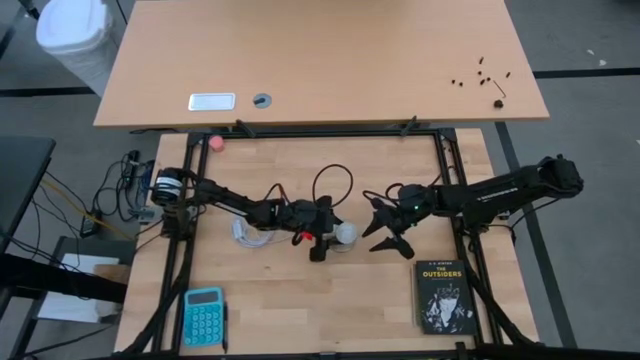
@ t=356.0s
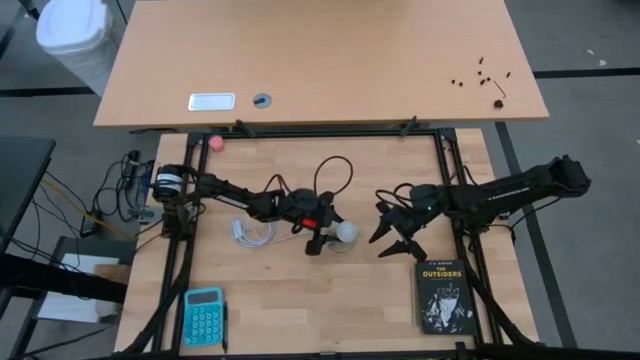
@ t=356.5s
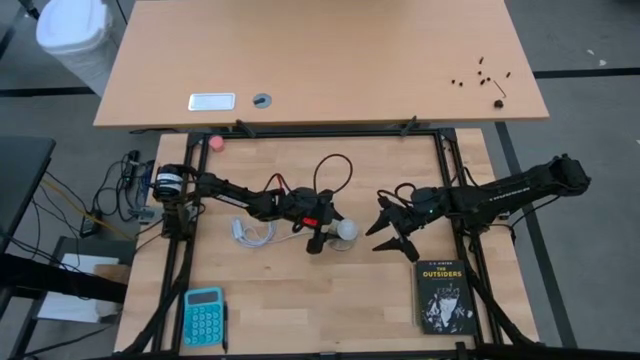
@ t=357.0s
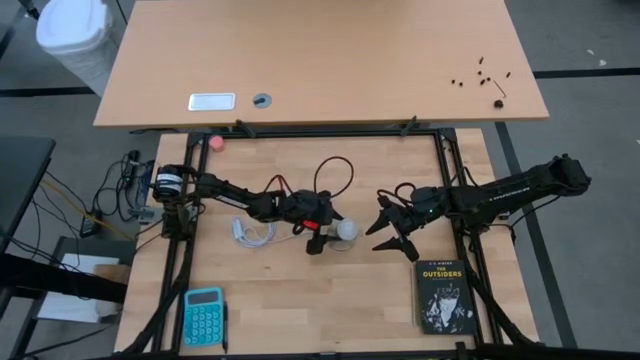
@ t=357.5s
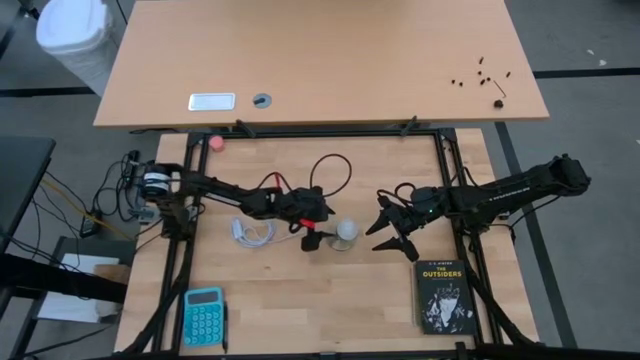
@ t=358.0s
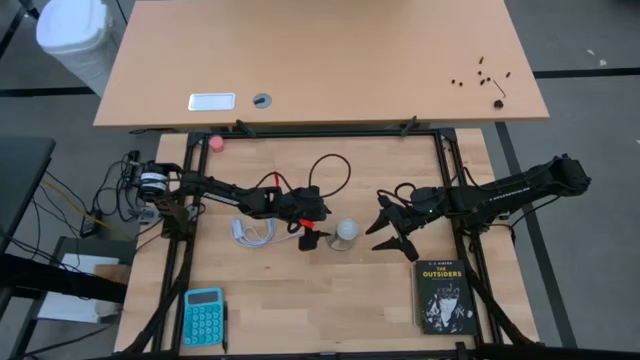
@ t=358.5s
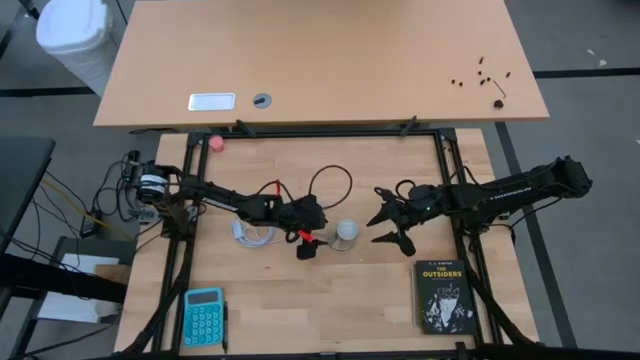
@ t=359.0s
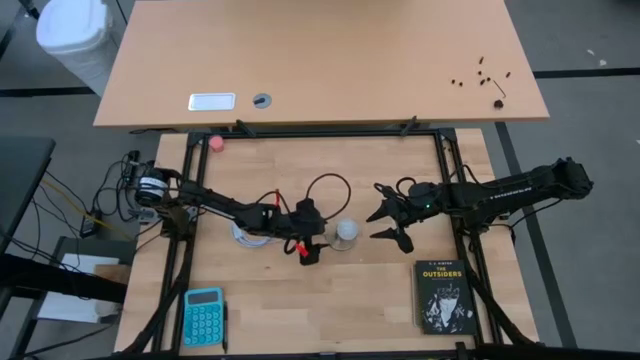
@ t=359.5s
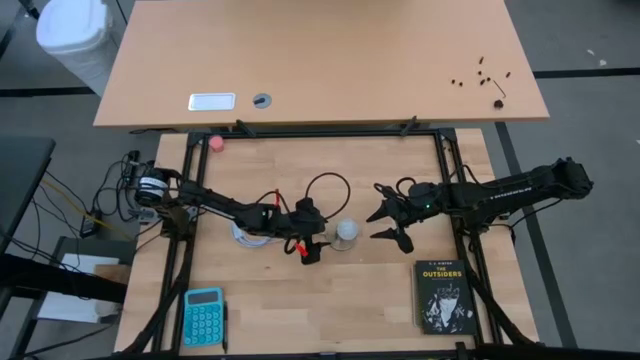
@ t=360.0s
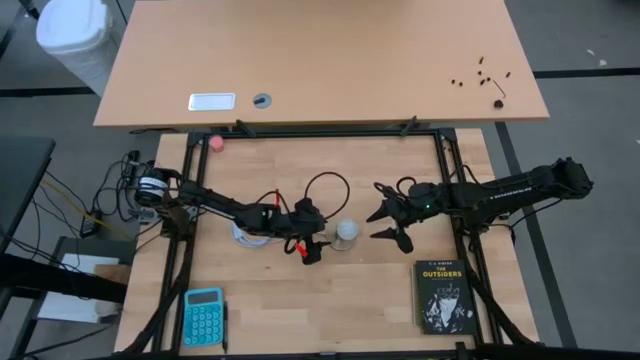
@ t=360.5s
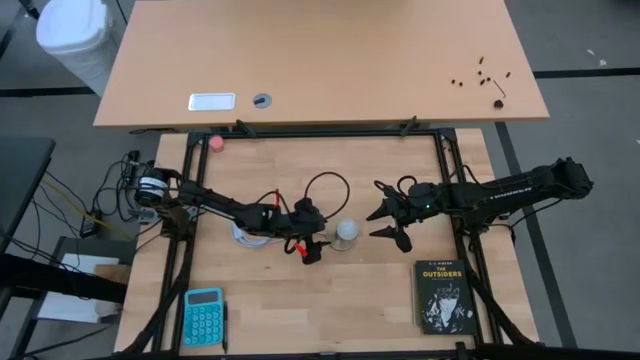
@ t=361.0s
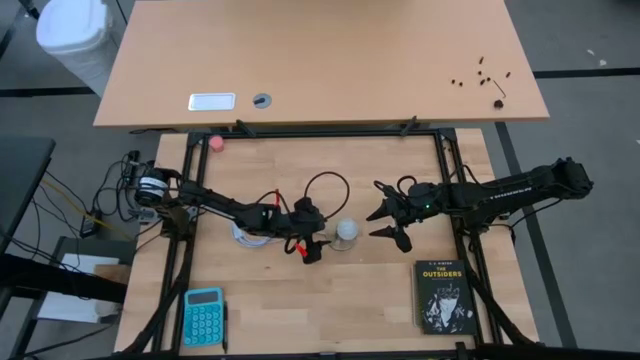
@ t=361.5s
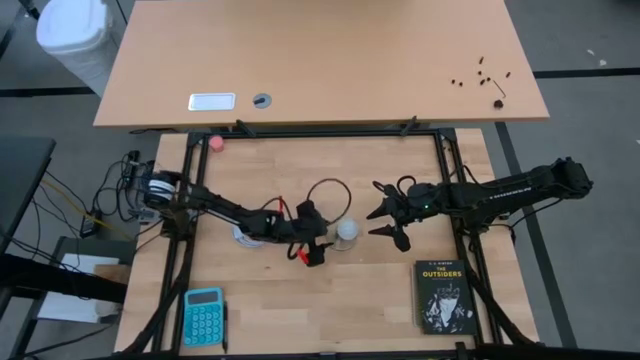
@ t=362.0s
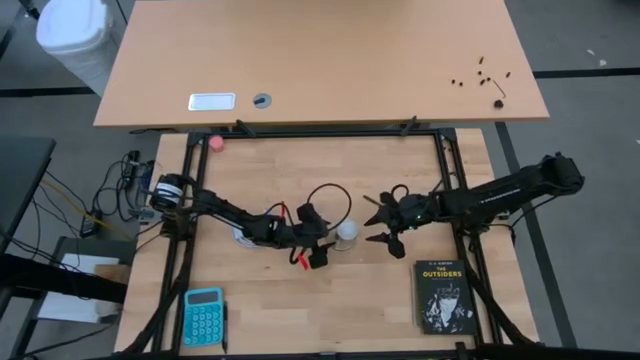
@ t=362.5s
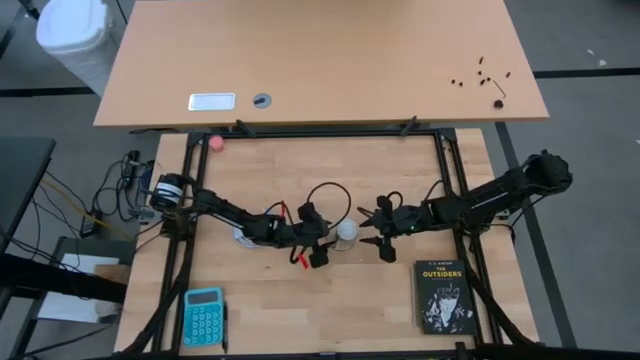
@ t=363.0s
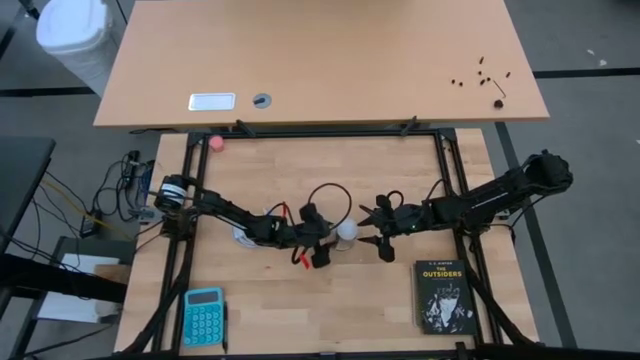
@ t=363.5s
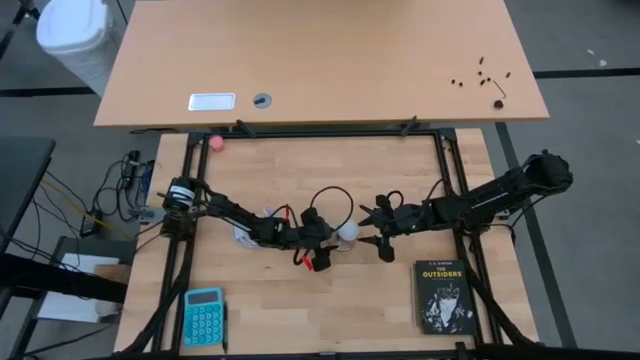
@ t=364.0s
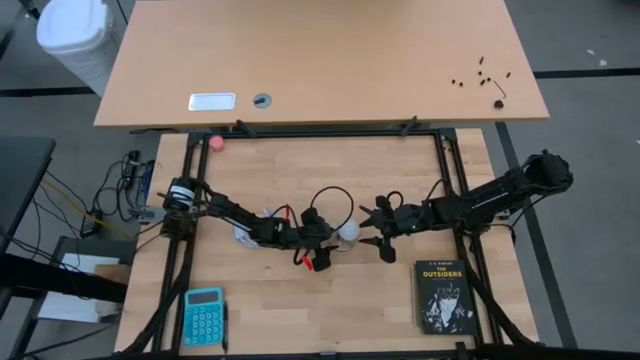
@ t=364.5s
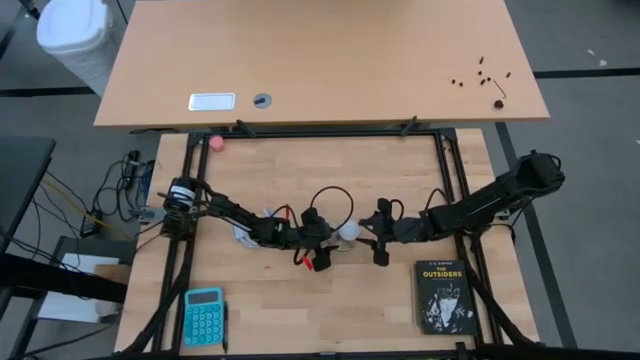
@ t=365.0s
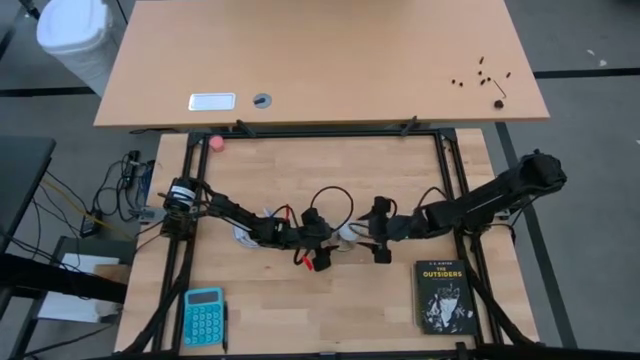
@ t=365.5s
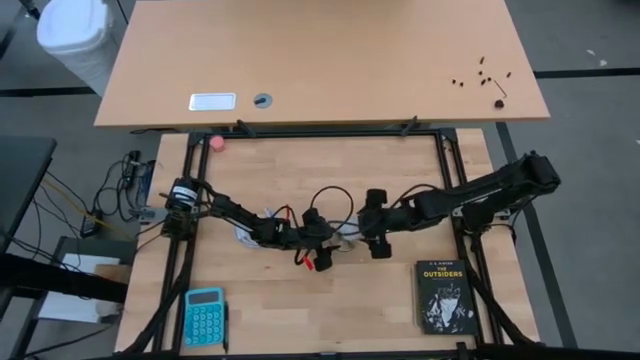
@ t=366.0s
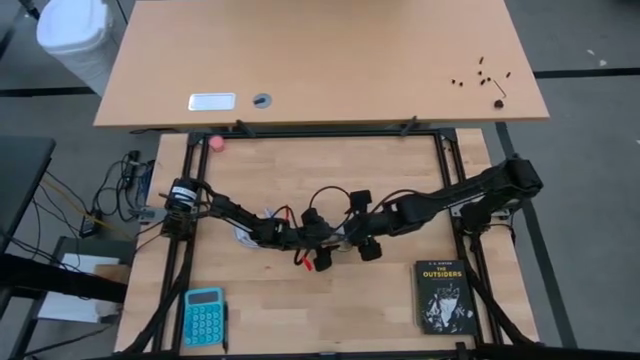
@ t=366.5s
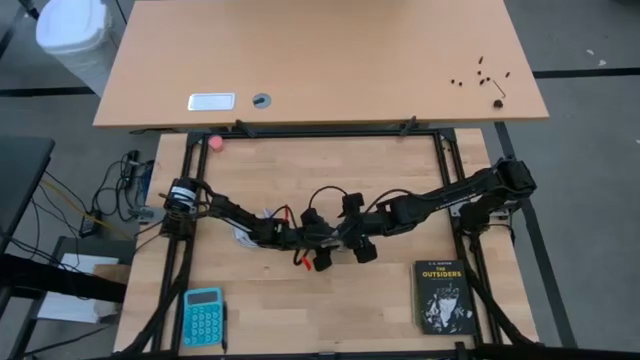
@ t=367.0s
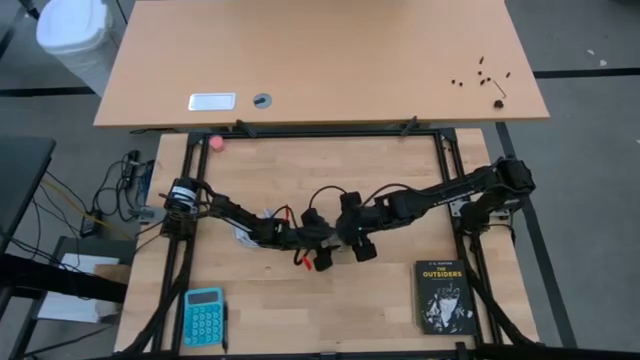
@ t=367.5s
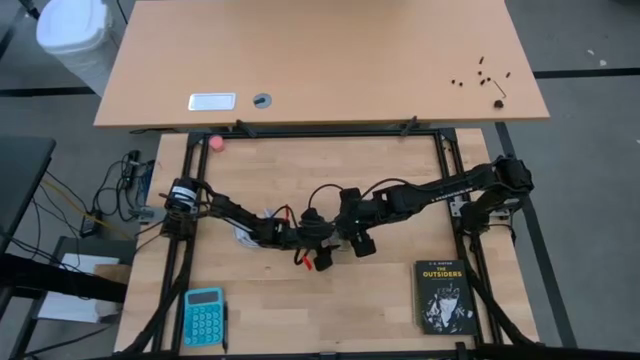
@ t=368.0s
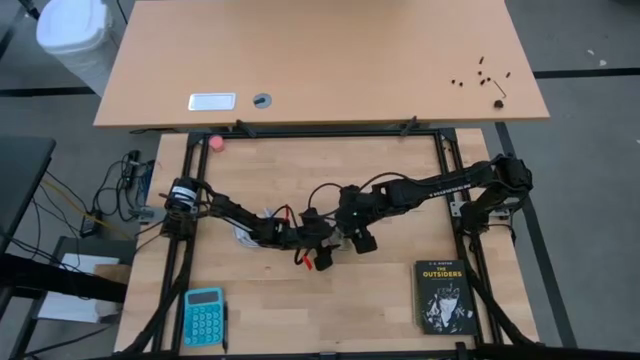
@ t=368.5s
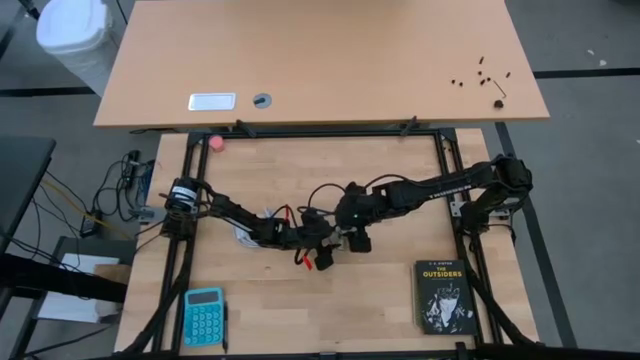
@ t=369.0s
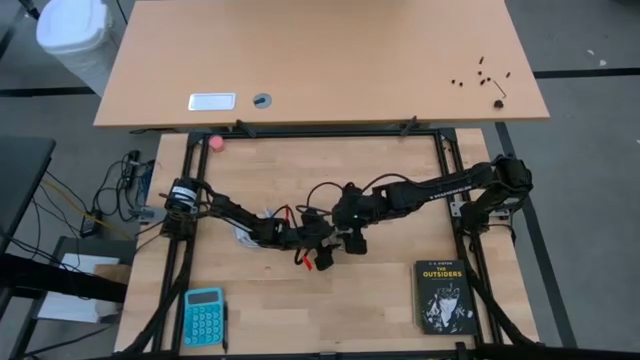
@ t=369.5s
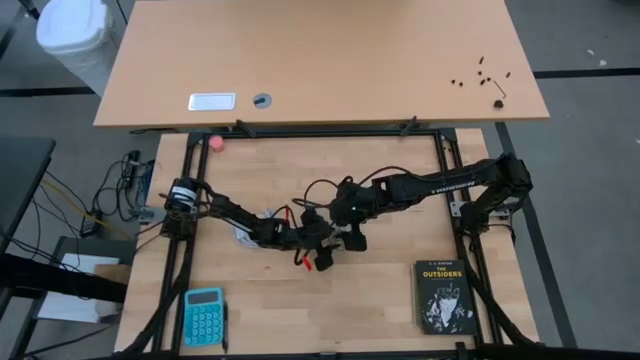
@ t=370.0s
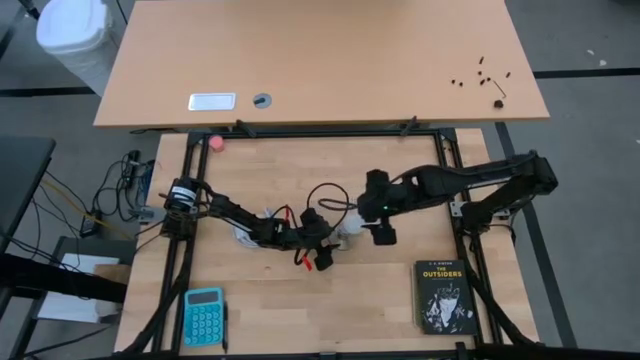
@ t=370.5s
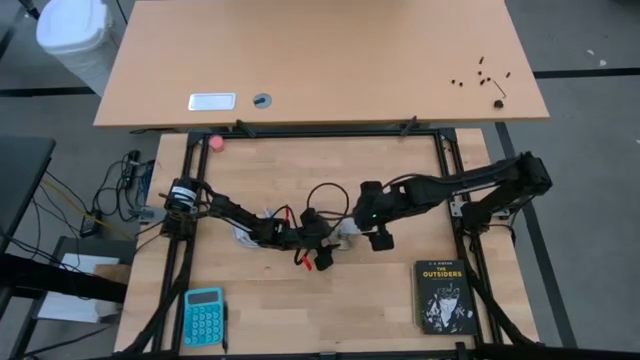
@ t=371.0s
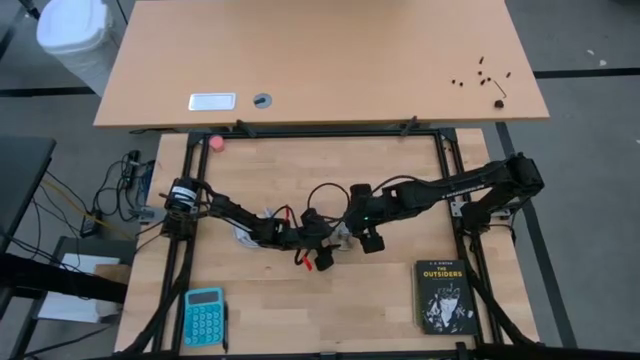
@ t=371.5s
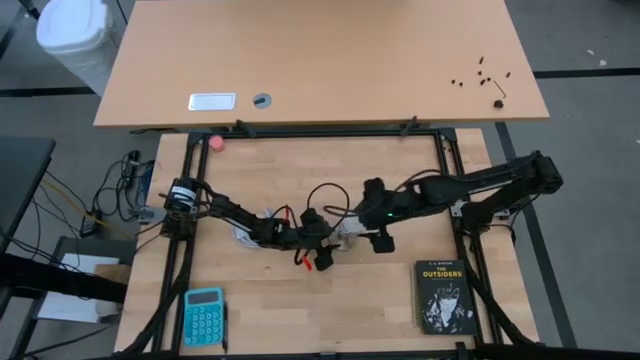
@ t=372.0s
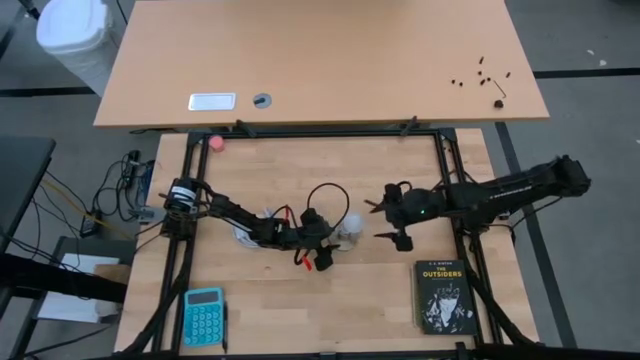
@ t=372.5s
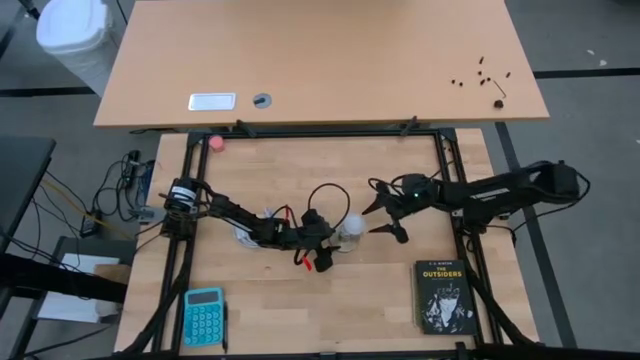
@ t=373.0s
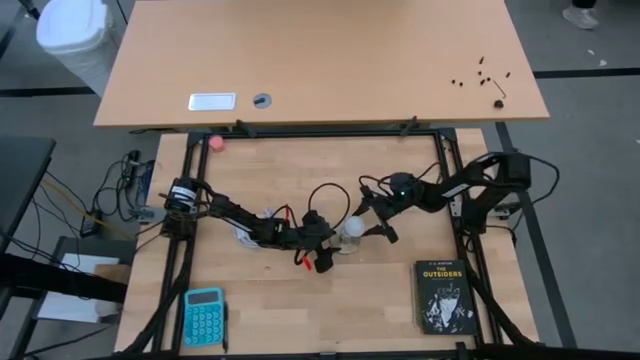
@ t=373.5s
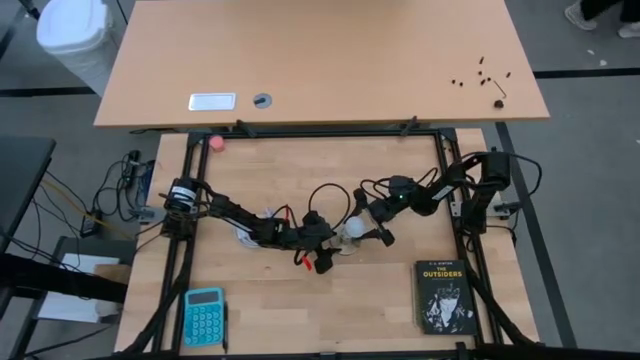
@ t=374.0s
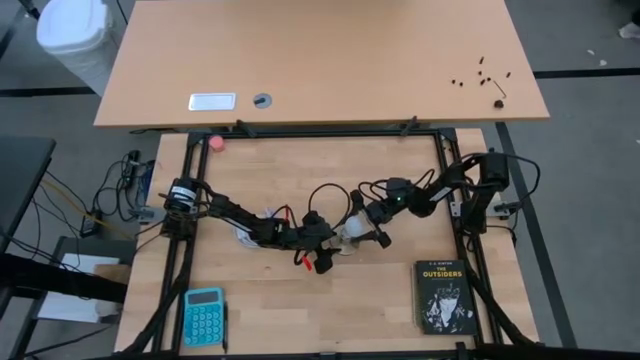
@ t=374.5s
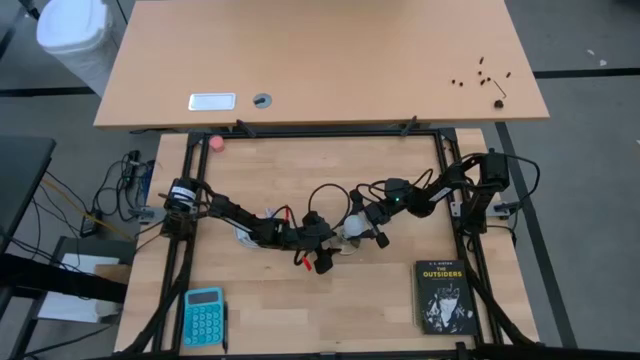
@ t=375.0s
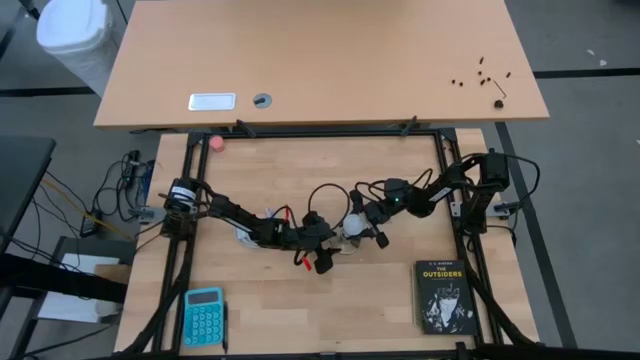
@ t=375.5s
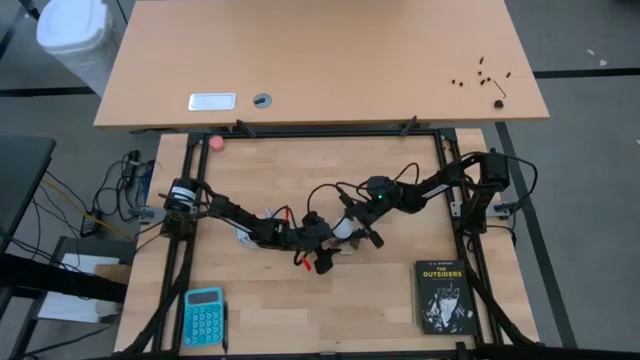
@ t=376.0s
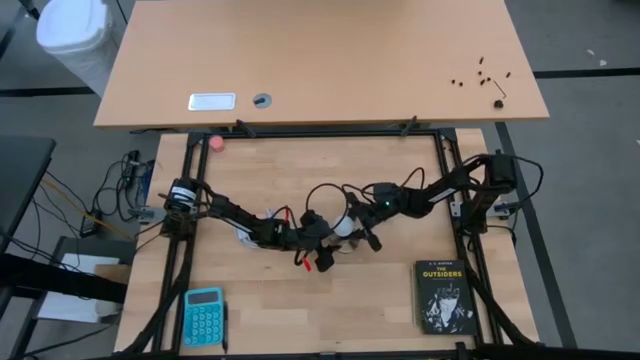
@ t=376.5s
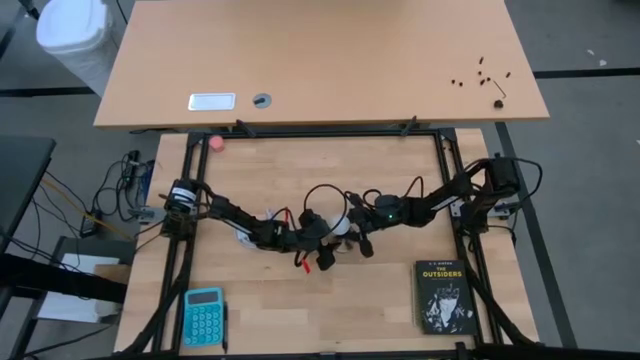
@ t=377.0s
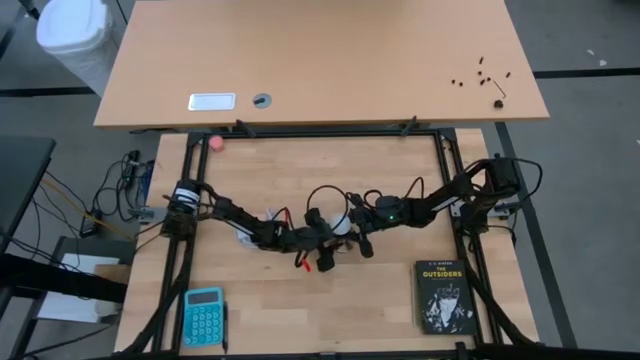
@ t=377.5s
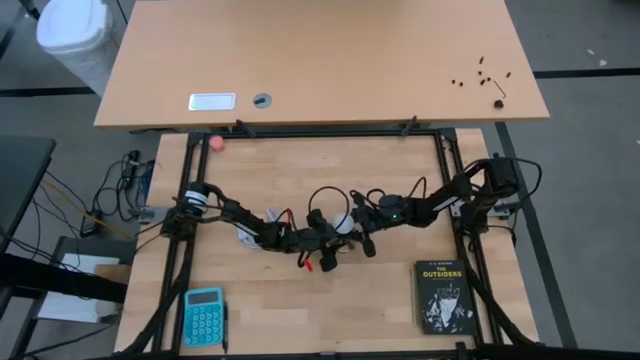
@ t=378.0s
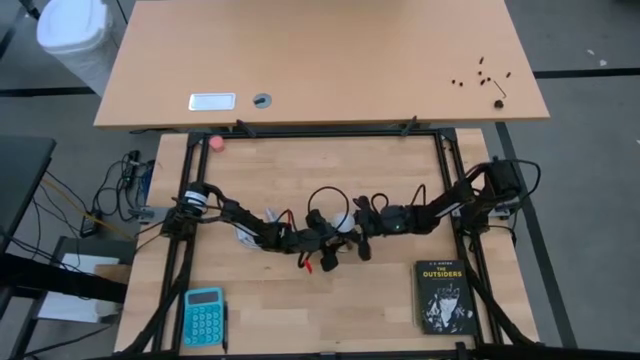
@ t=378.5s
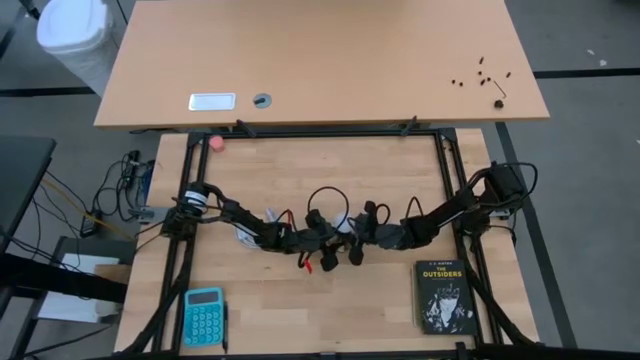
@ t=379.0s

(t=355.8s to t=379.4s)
Task: Screw lightbulb
Insert the white lightbulb into the silver lamp
